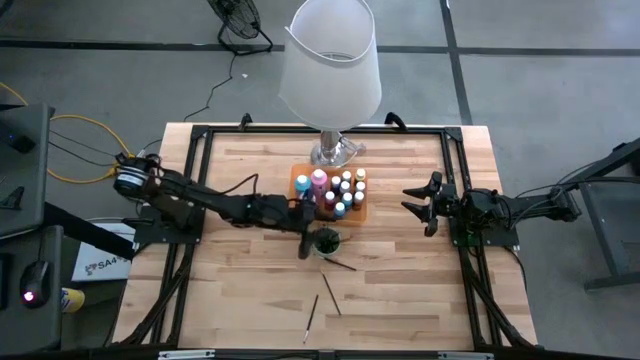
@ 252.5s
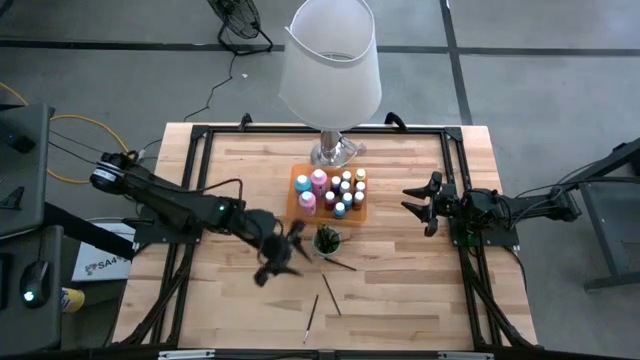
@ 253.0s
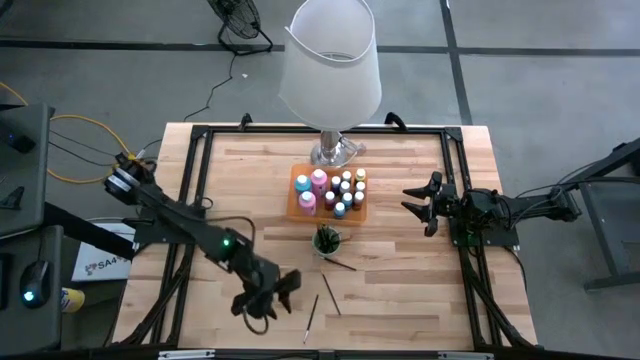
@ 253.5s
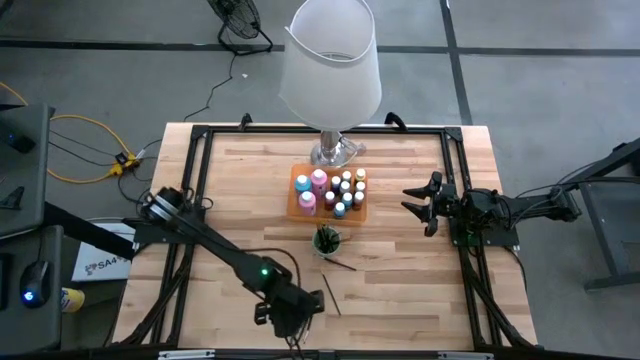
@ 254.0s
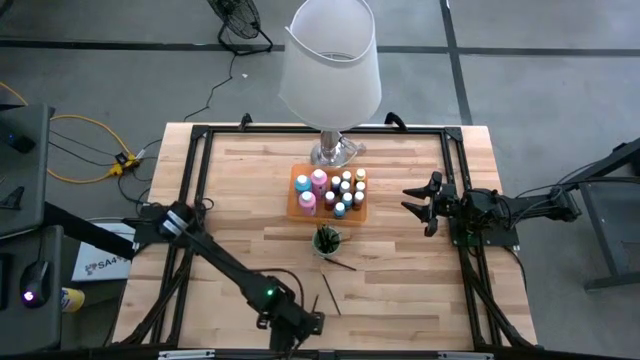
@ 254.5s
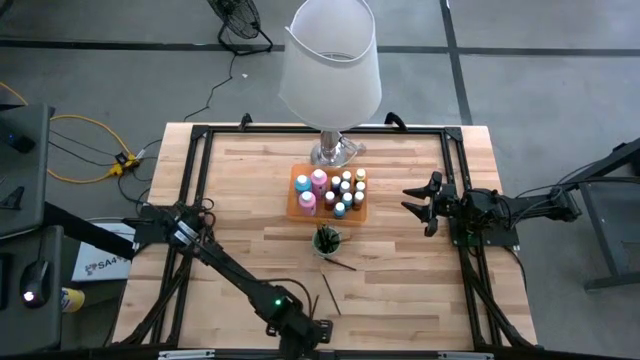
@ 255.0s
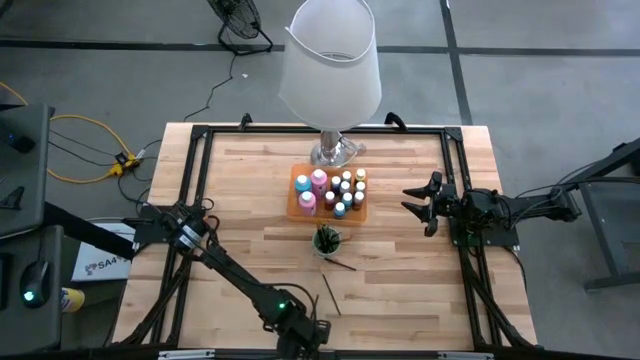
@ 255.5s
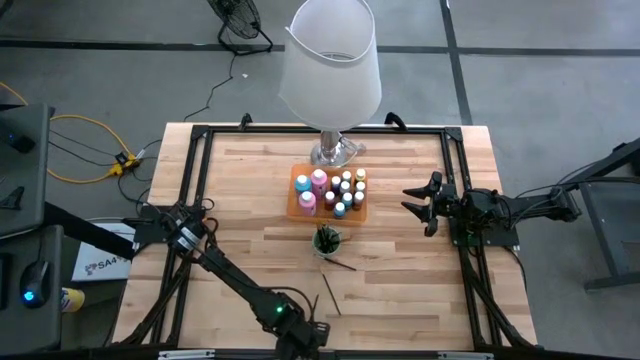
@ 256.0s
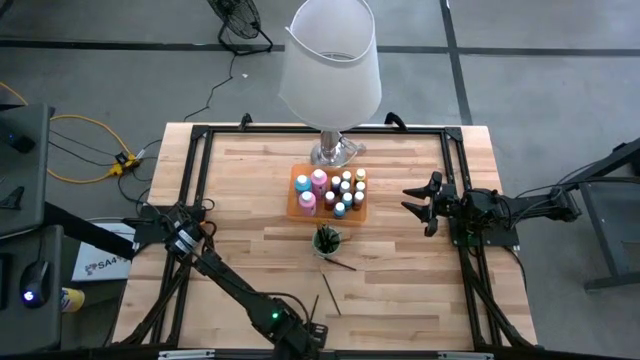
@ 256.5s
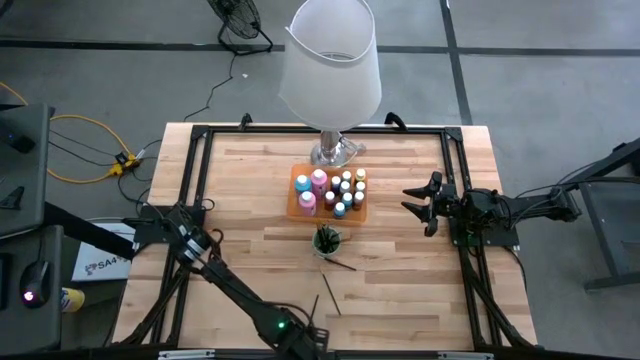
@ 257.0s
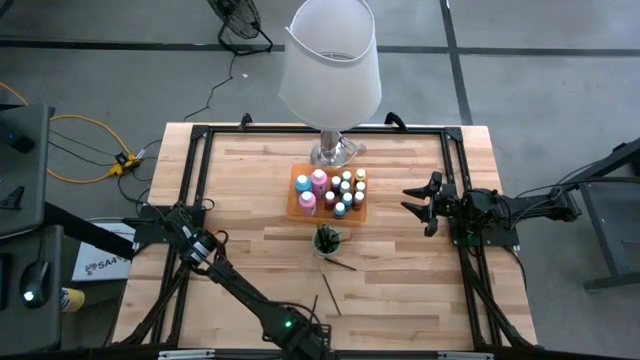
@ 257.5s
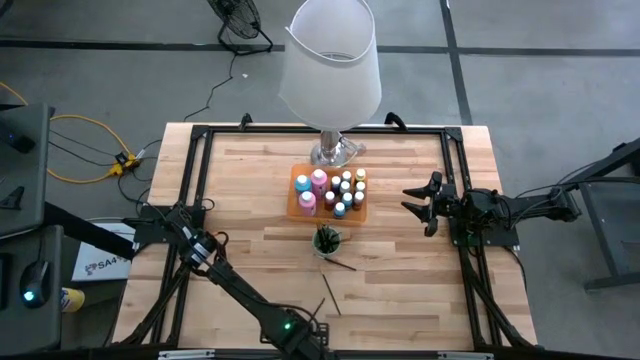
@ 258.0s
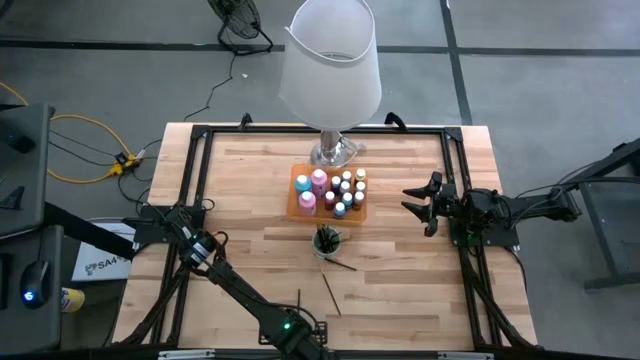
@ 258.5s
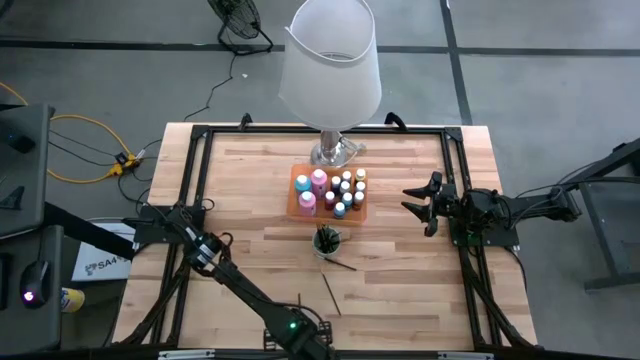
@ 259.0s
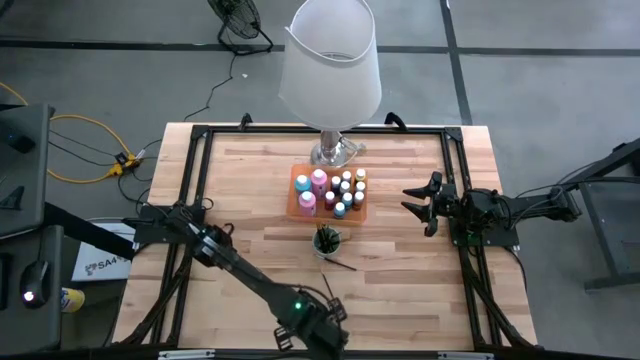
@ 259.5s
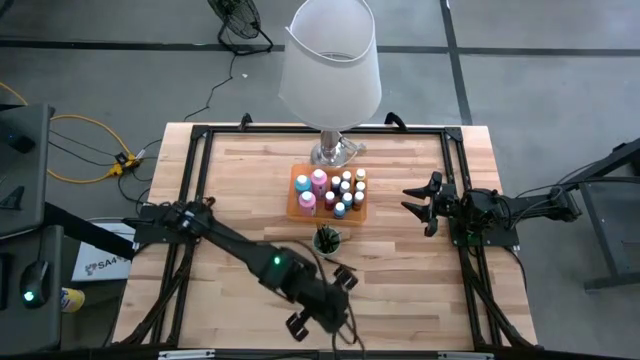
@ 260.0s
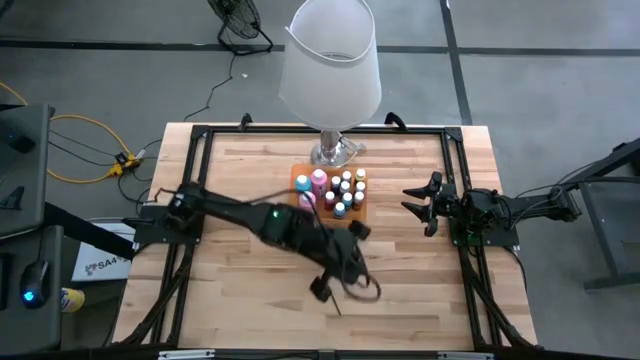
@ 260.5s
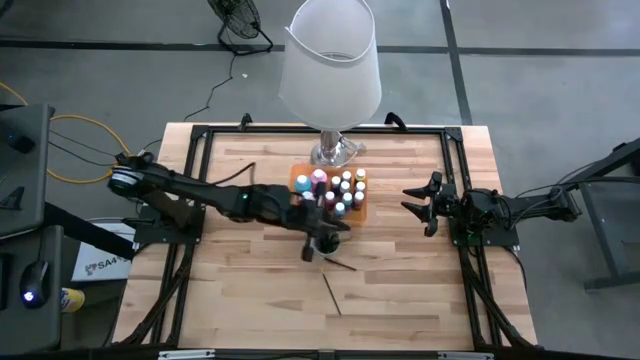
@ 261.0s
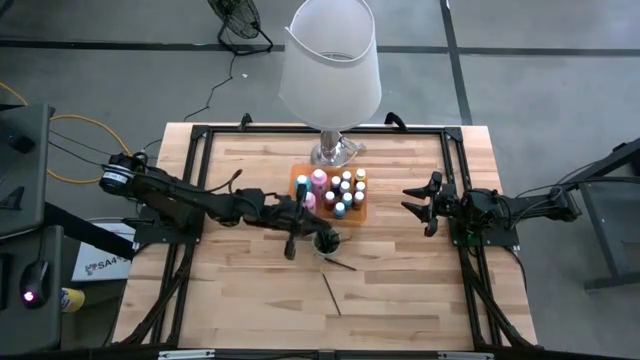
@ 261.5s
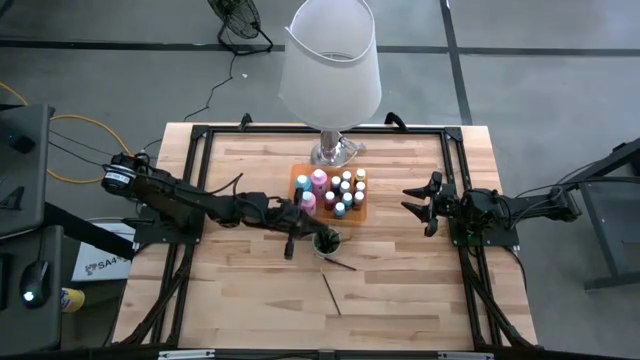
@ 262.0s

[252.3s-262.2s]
Task: Pick & Place Paint Supplies
Put the gray paintbrushes into the green cup

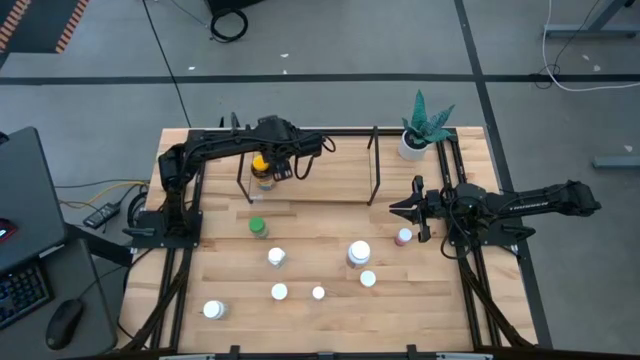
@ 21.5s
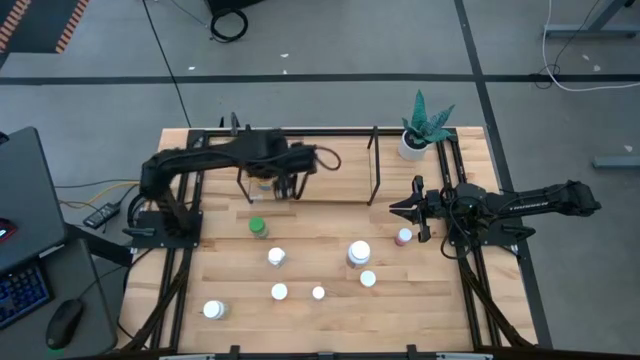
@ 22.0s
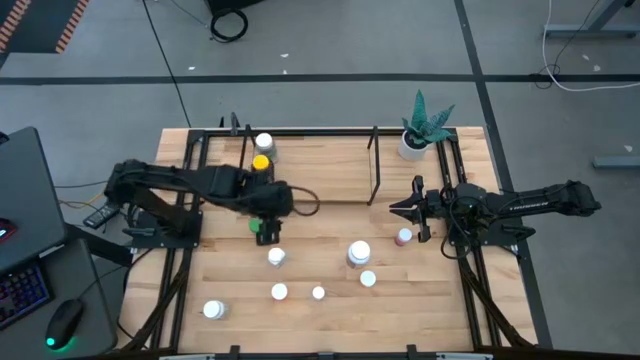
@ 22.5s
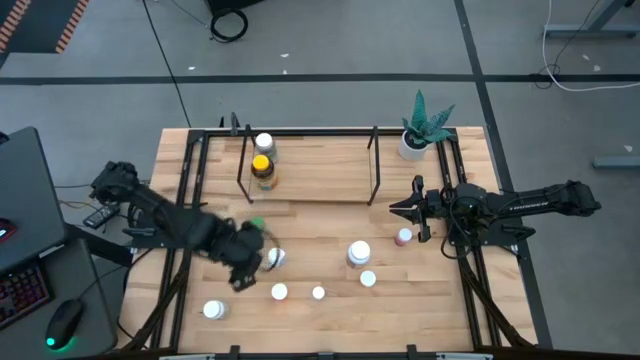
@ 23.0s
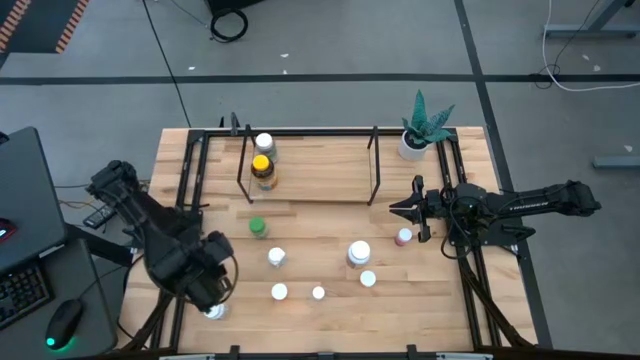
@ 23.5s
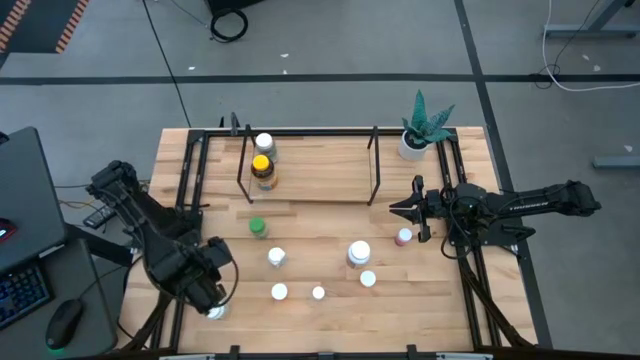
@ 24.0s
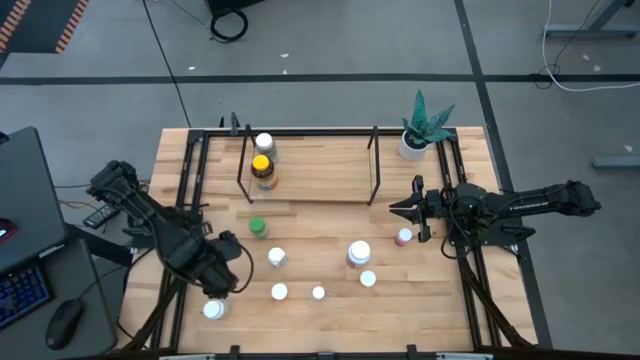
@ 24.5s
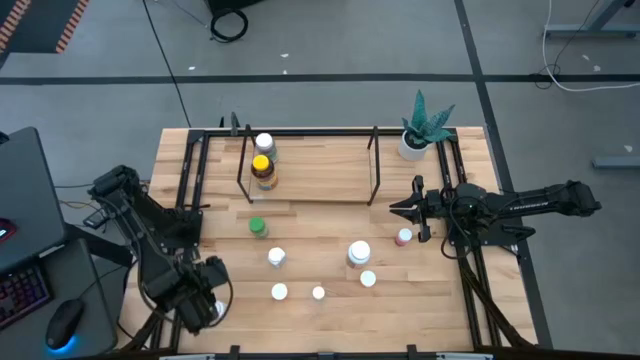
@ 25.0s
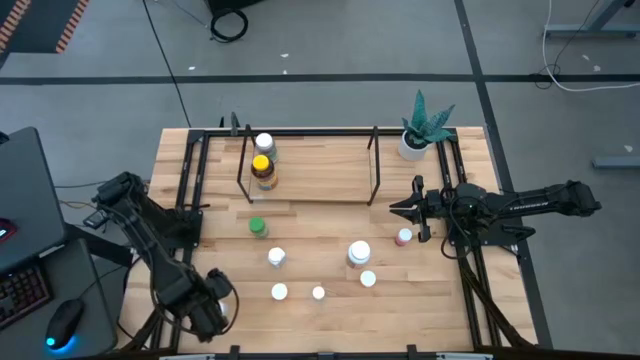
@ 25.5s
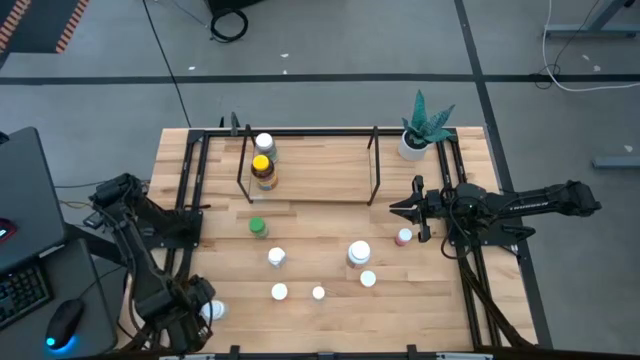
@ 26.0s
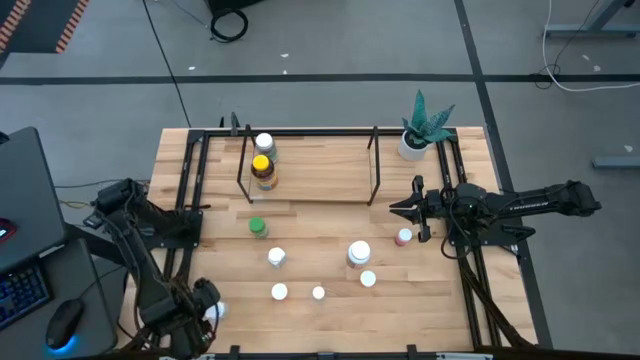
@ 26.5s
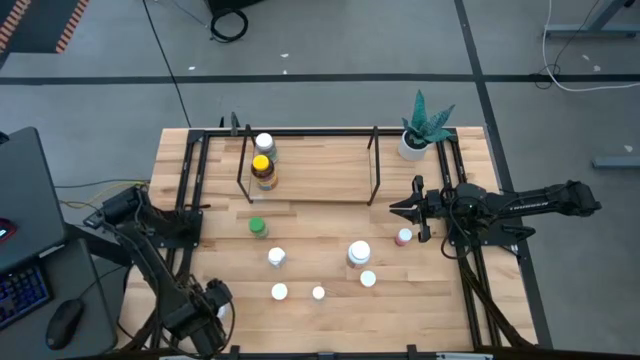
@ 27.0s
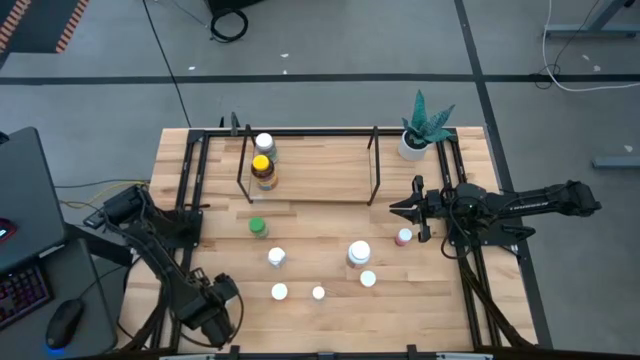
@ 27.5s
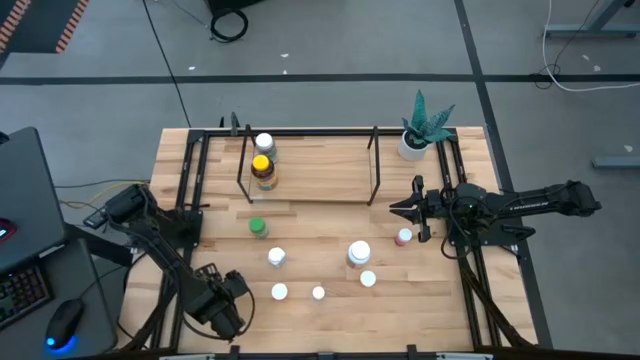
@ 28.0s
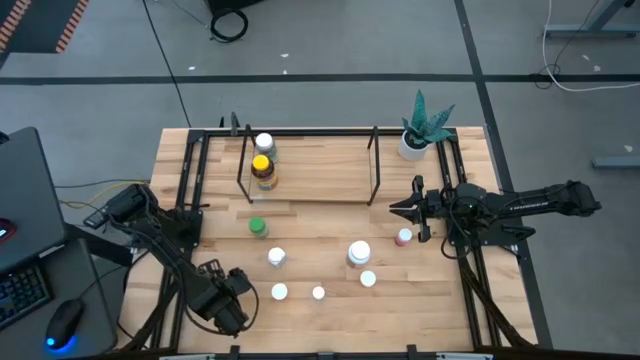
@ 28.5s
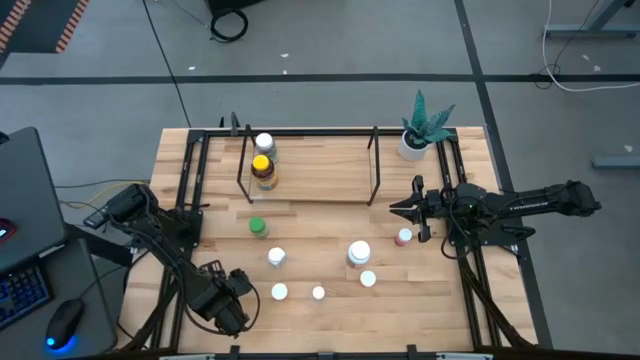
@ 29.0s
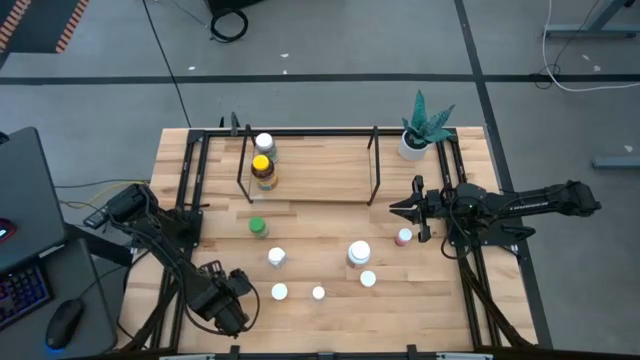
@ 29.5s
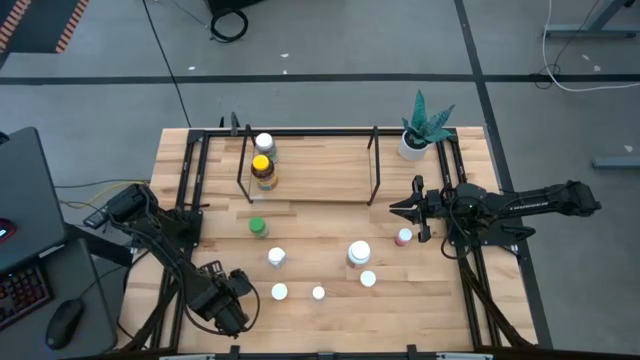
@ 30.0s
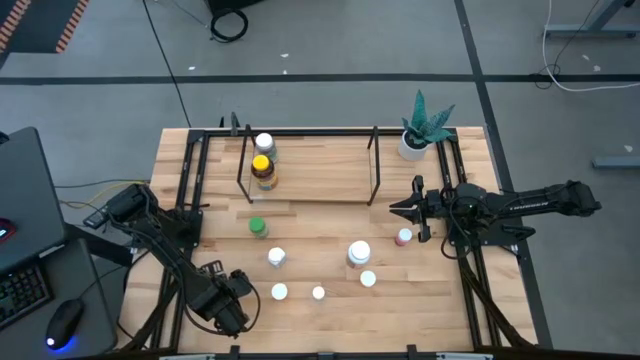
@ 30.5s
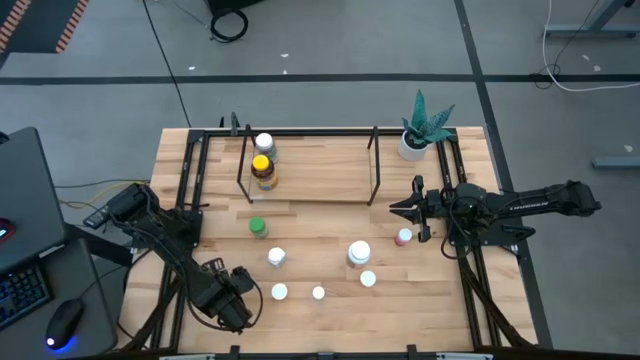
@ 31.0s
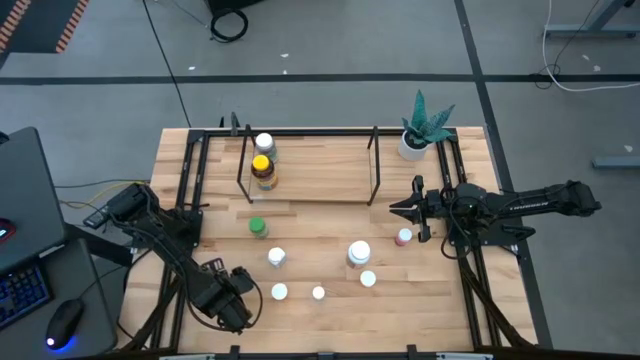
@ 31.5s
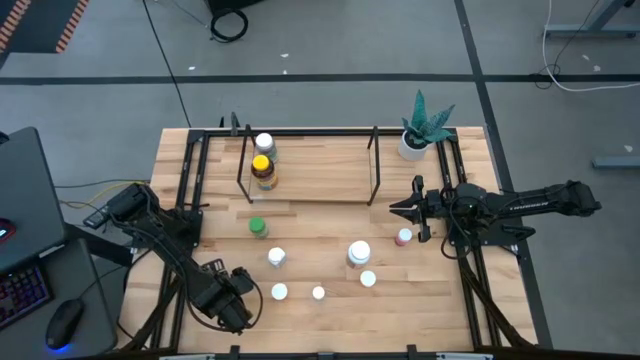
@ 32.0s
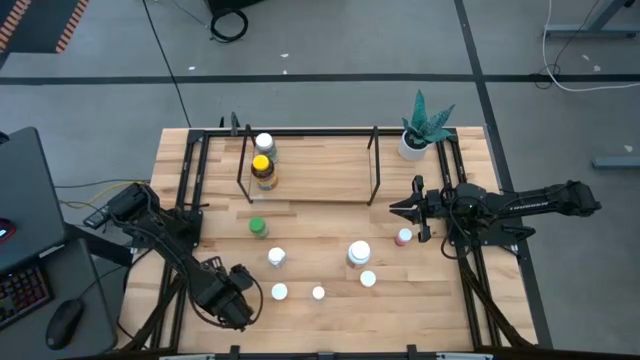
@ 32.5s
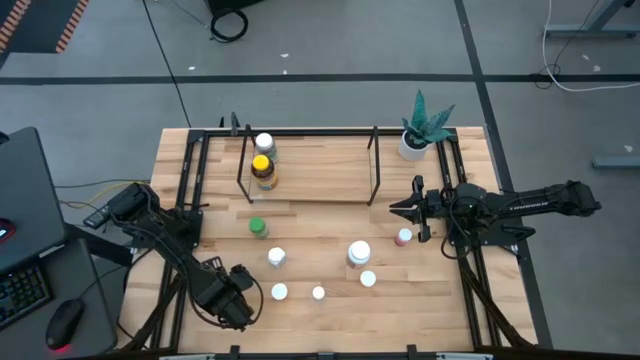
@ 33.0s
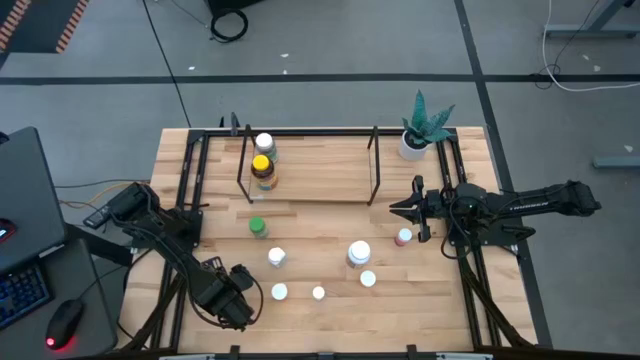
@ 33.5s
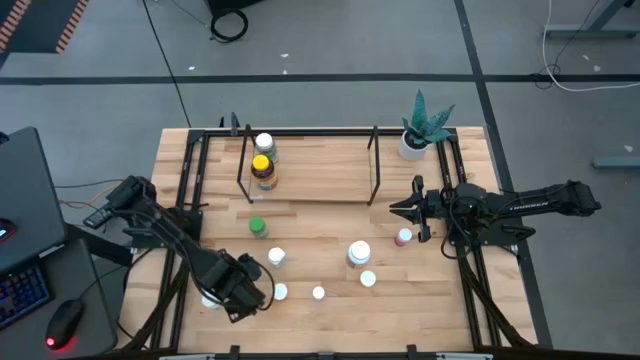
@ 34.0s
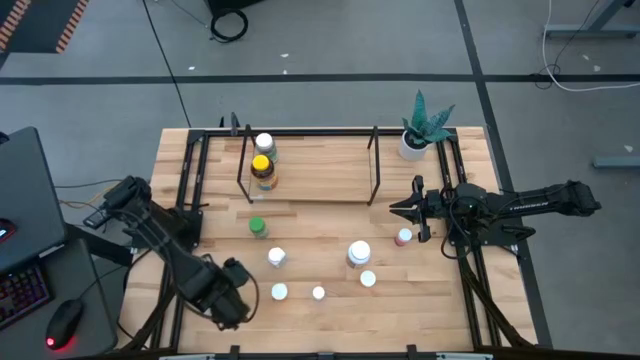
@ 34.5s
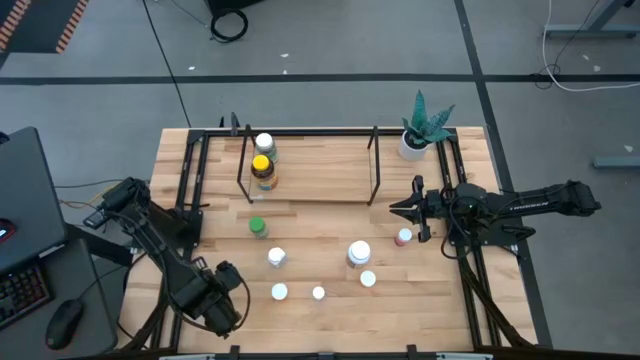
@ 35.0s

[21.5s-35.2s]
Task: Pick and place medicine bottles onto shelf by color
Put the bottom white green pill bottle on the shelf
